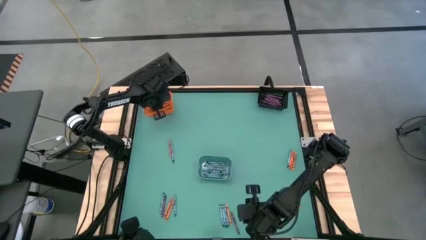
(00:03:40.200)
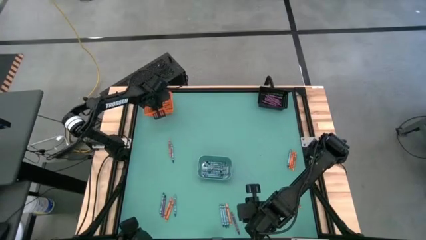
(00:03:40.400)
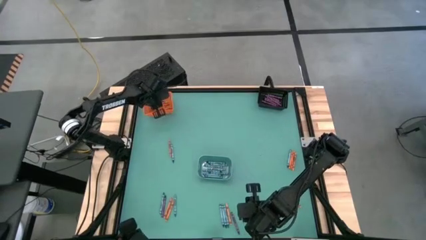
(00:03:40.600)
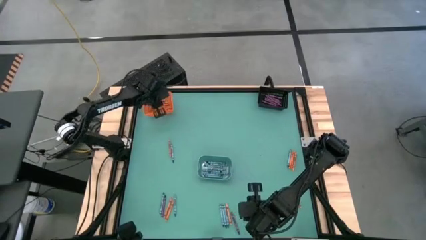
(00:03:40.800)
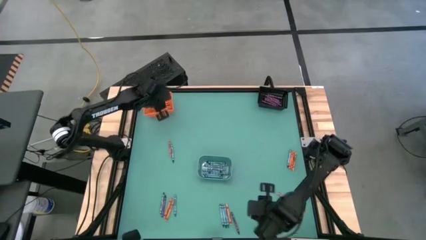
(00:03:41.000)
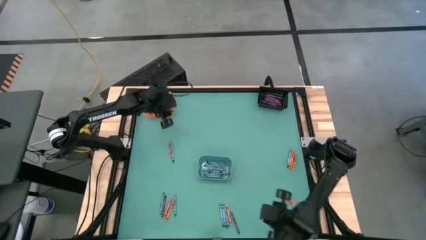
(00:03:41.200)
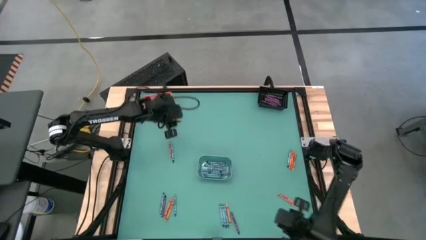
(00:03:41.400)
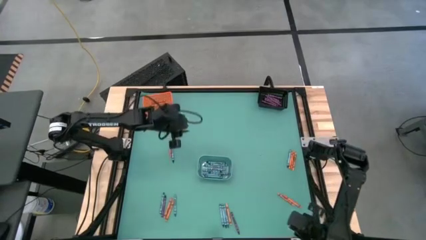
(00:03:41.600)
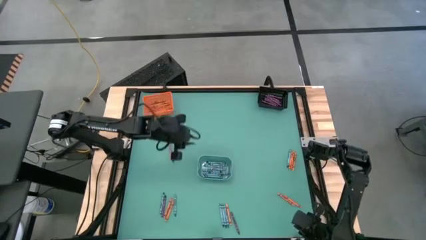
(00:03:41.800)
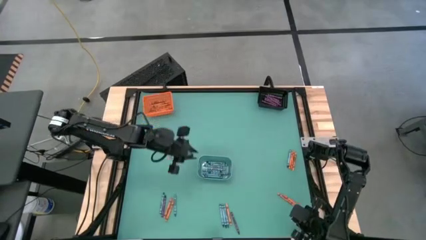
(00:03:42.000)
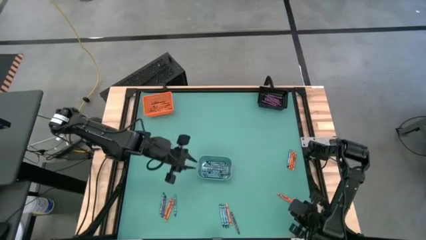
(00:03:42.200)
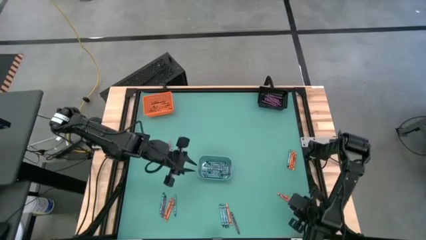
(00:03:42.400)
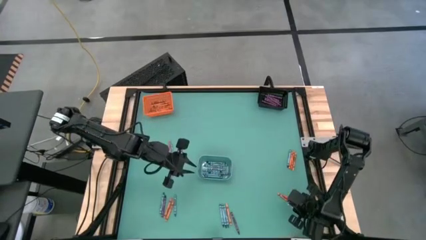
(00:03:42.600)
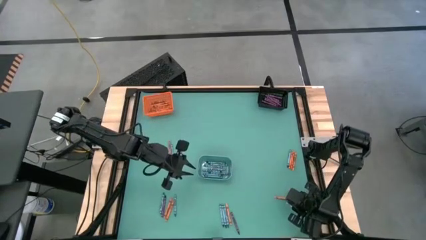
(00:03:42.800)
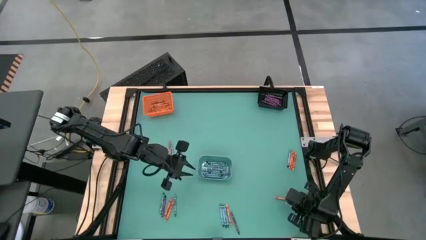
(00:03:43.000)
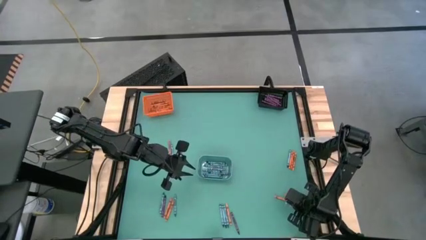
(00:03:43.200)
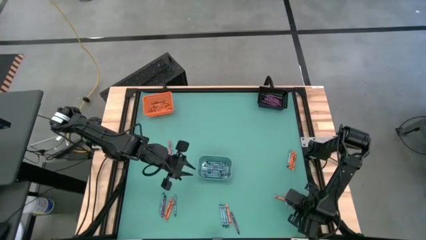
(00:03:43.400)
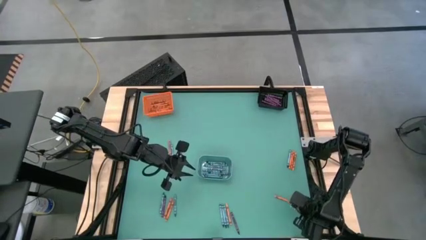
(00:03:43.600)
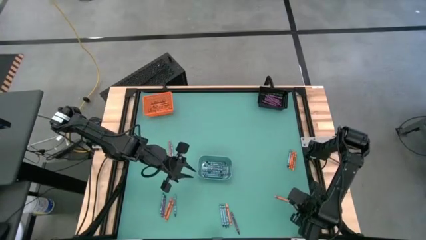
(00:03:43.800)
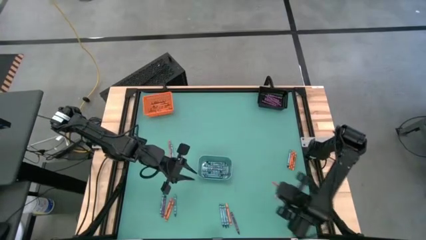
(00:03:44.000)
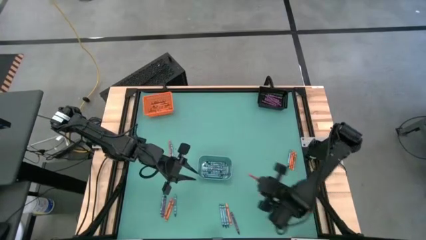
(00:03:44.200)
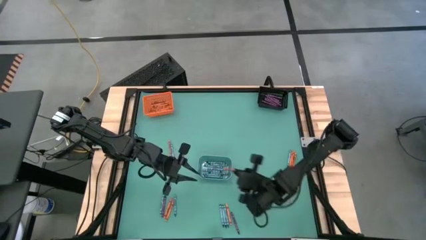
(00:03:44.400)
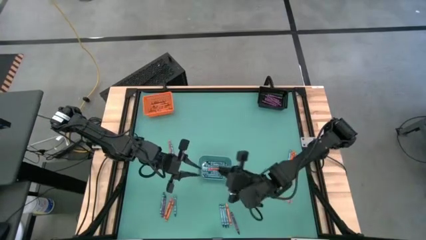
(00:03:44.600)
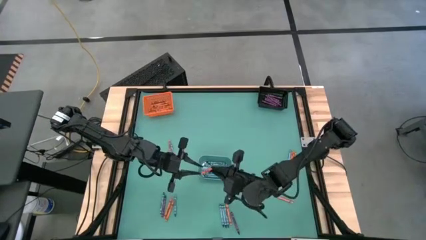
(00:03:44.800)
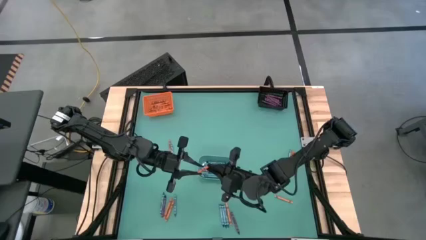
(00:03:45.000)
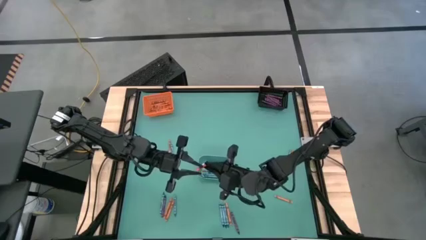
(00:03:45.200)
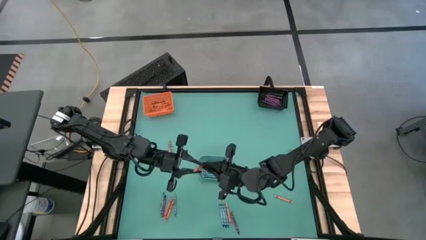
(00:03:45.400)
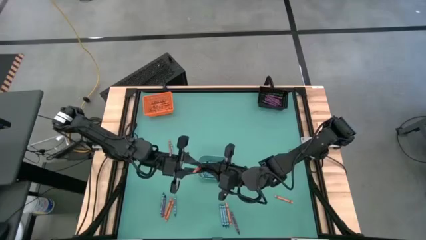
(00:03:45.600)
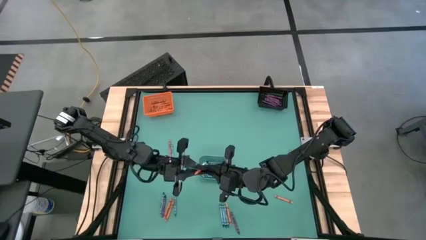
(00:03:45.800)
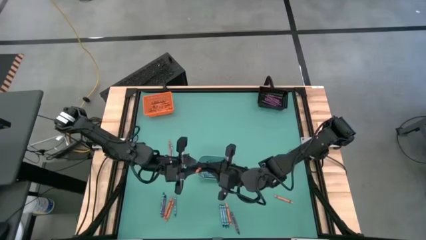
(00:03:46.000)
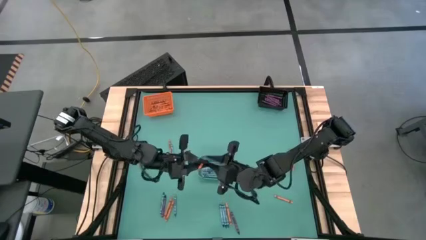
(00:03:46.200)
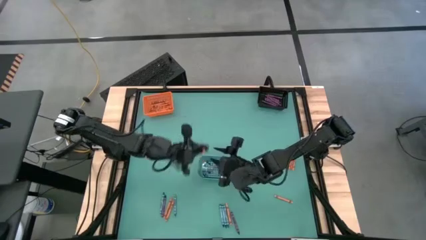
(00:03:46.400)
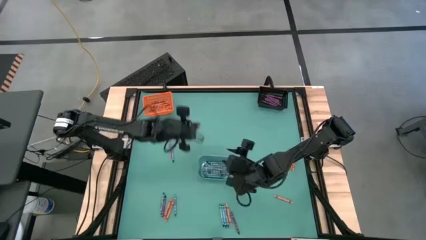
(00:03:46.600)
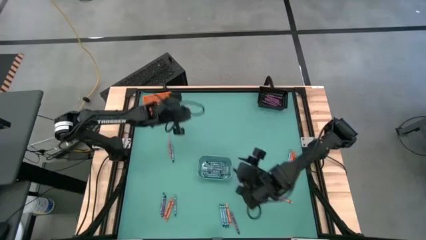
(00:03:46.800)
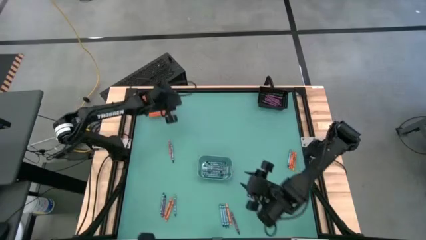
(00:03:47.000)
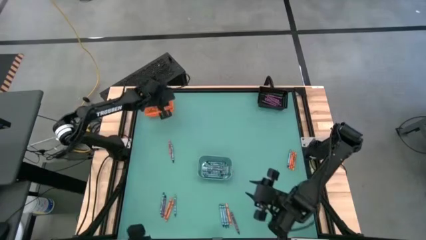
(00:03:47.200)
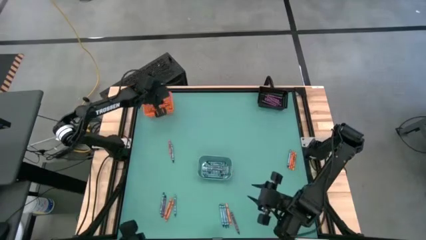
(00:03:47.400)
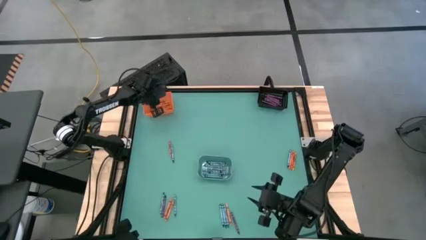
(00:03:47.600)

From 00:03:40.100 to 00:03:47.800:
Task: Sort crayons
Put the orange crayon into the orange bin

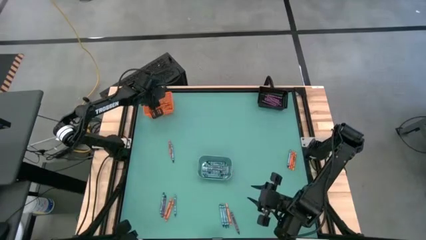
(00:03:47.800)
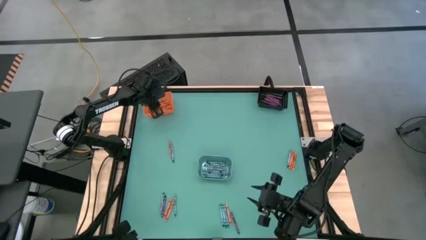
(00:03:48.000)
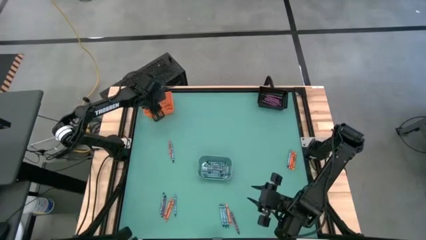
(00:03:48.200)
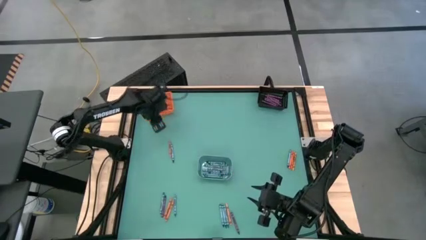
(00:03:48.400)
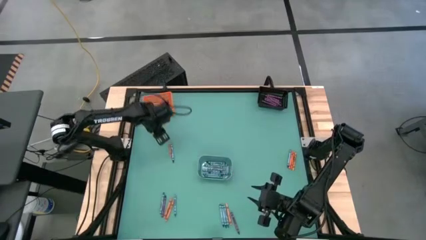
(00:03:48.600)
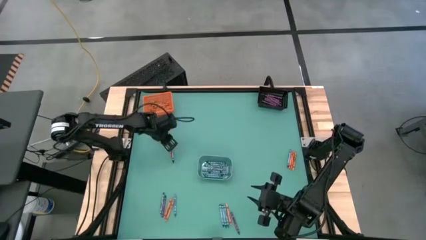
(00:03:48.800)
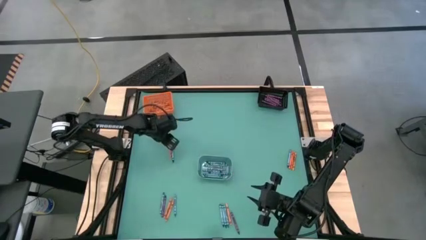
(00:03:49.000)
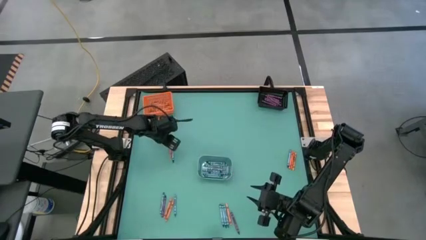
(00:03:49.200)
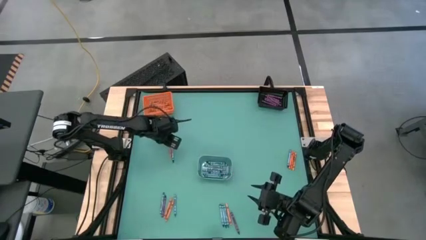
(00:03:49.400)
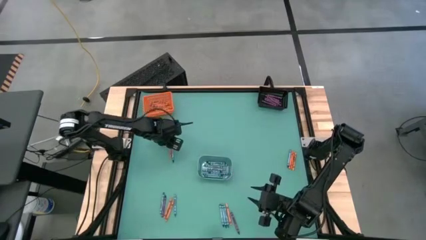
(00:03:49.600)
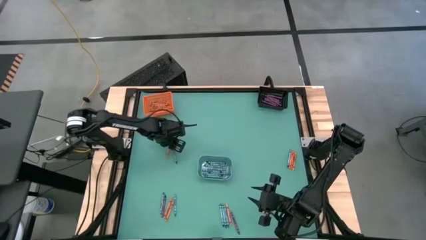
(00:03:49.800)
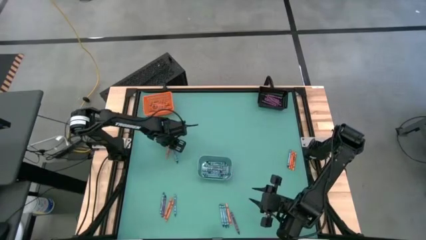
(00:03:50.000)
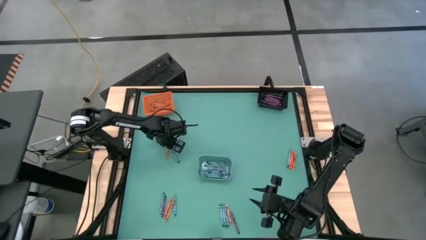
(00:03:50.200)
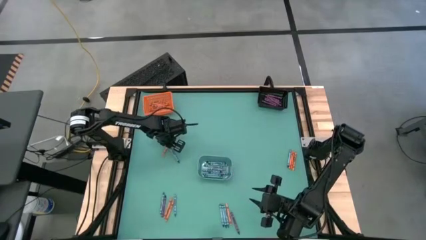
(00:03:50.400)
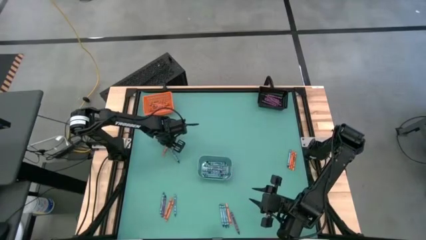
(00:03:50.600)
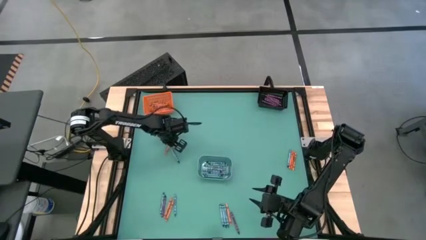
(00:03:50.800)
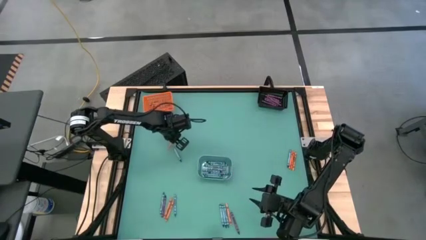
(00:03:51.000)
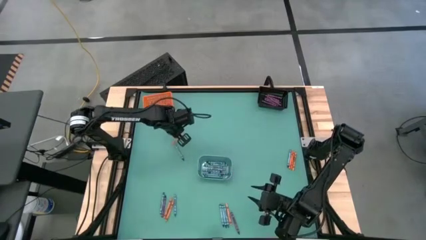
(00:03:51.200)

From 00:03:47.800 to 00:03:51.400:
Put the orange crayon into the orange bin

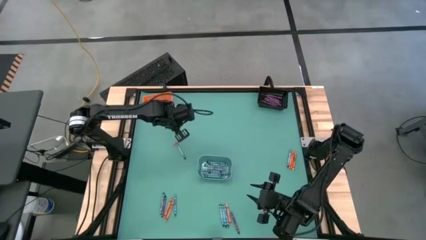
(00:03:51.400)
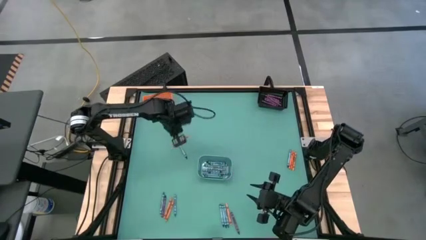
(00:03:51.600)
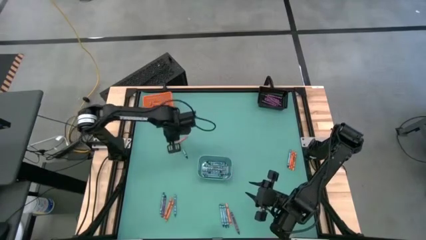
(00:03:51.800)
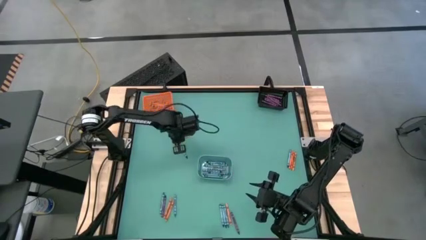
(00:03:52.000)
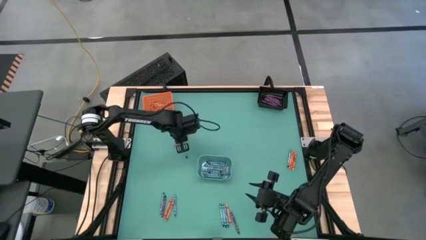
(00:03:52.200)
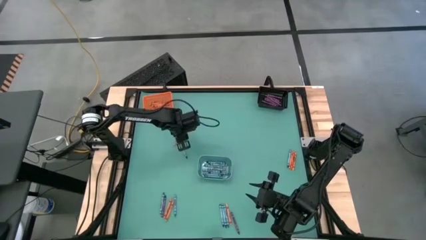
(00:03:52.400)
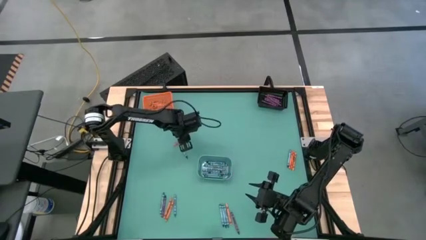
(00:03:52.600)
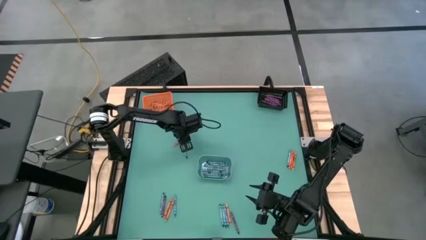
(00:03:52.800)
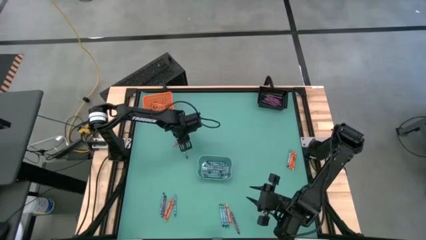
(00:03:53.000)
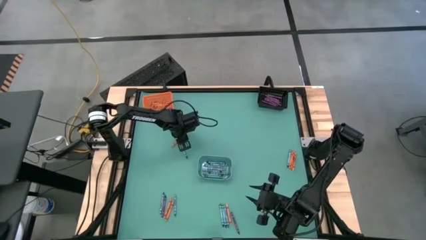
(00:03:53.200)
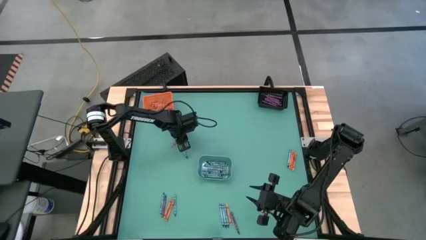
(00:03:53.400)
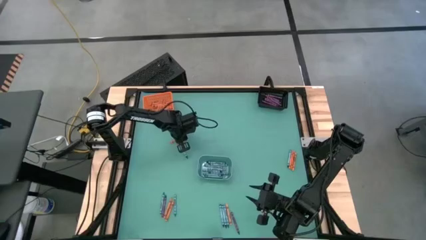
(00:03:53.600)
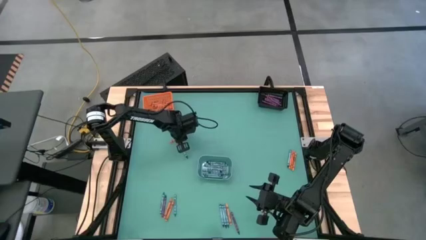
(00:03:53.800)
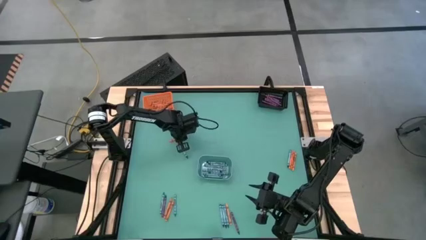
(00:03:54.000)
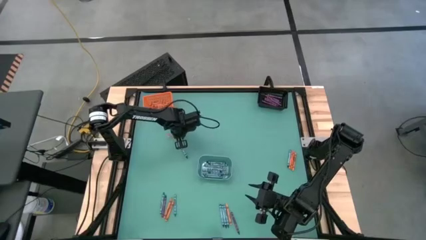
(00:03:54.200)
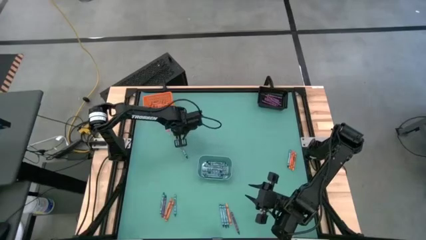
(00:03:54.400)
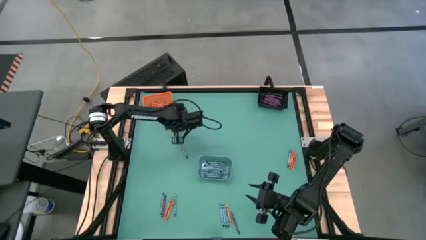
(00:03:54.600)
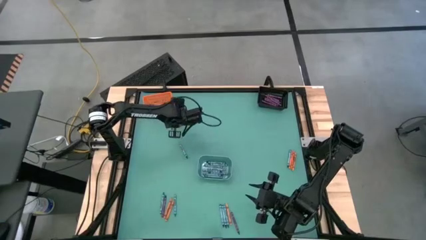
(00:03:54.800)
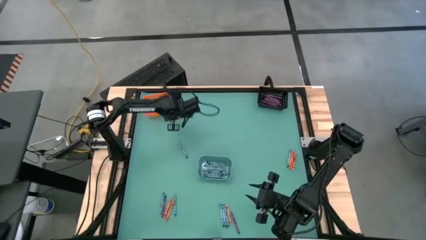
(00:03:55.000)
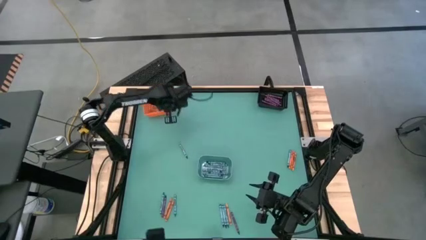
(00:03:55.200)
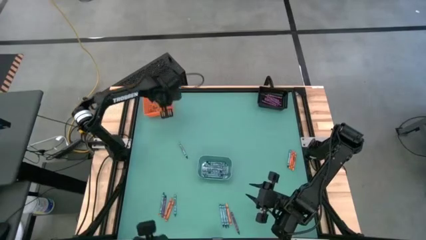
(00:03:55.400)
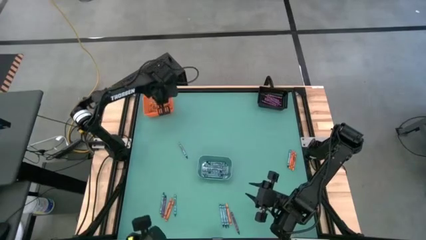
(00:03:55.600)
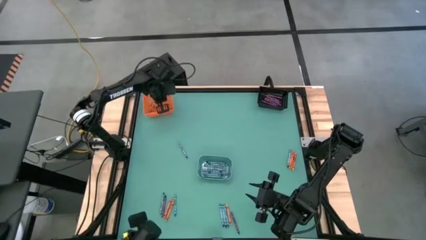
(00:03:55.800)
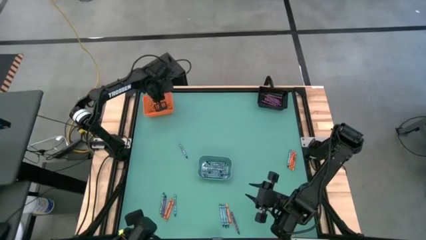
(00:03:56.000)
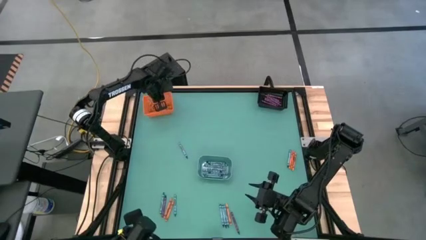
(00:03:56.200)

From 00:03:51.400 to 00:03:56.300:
Put the orange crayon into the orange bin
